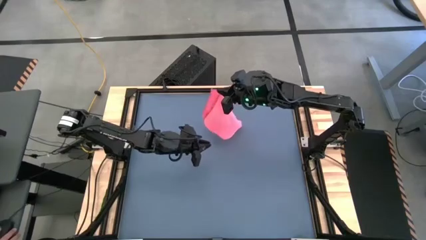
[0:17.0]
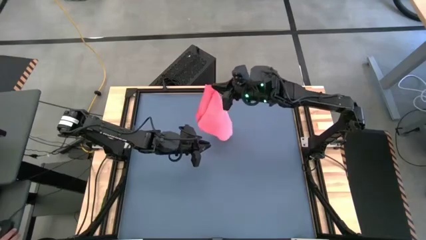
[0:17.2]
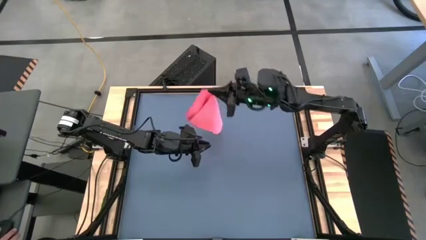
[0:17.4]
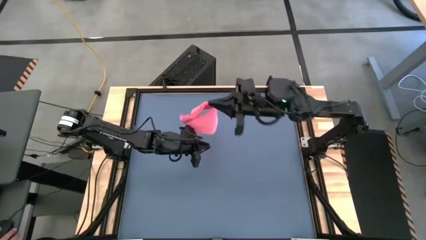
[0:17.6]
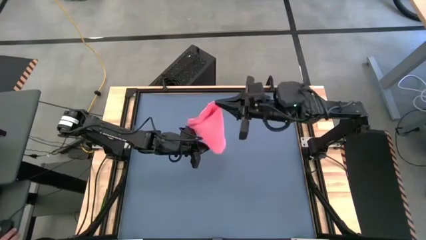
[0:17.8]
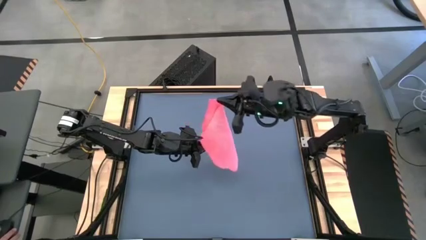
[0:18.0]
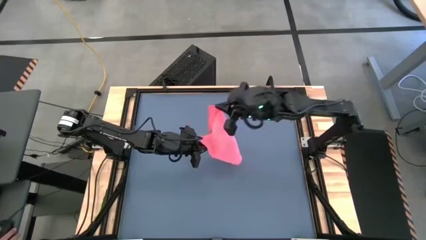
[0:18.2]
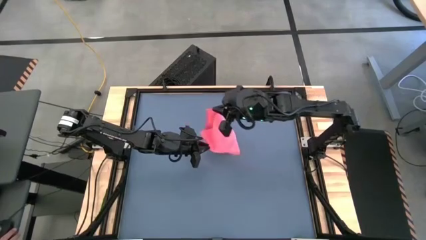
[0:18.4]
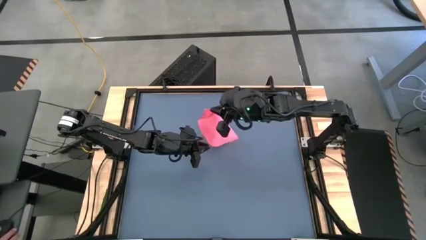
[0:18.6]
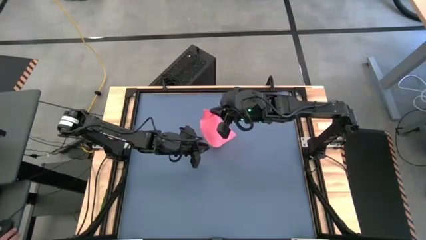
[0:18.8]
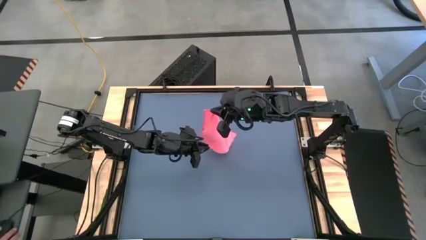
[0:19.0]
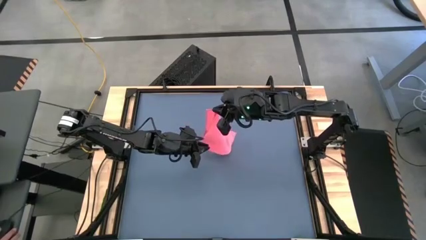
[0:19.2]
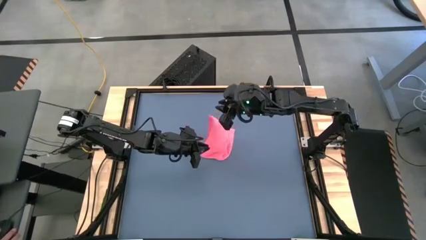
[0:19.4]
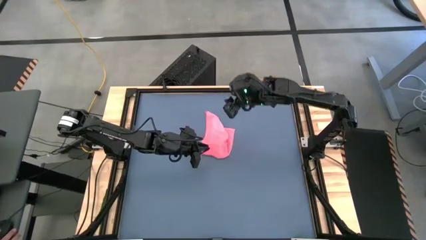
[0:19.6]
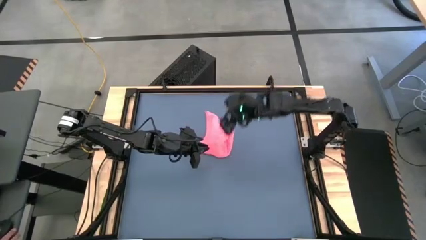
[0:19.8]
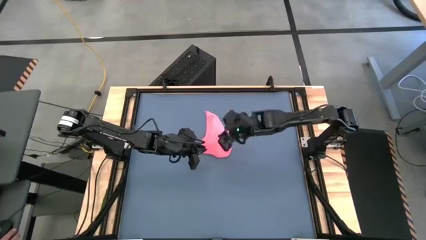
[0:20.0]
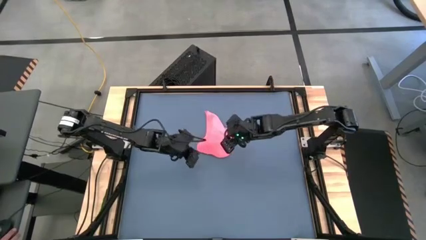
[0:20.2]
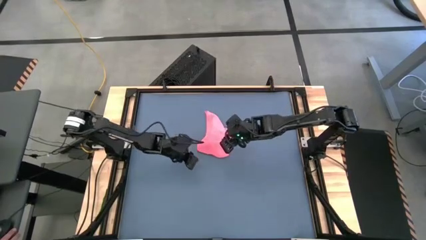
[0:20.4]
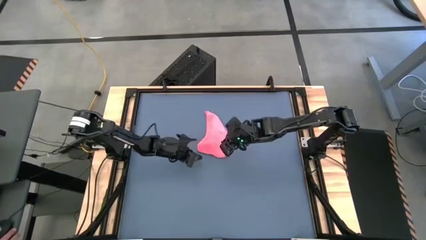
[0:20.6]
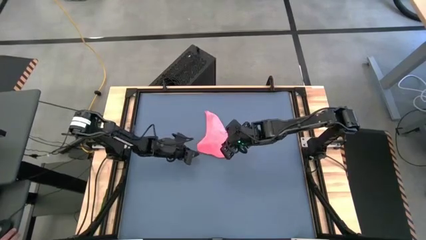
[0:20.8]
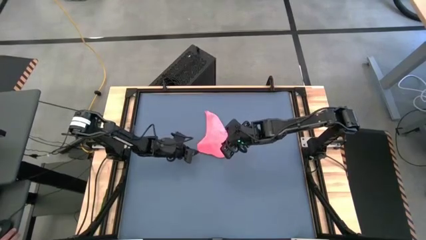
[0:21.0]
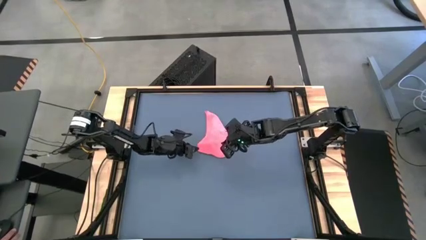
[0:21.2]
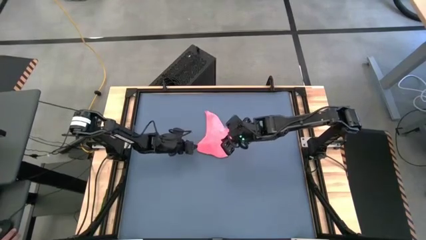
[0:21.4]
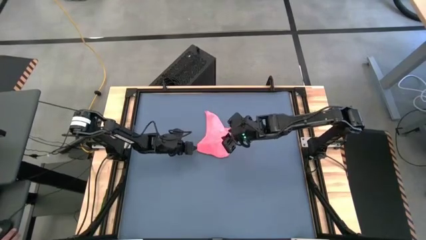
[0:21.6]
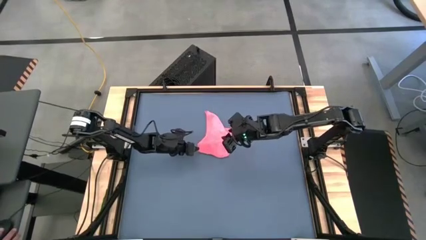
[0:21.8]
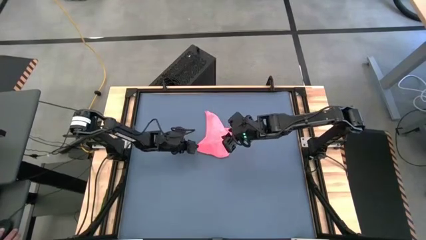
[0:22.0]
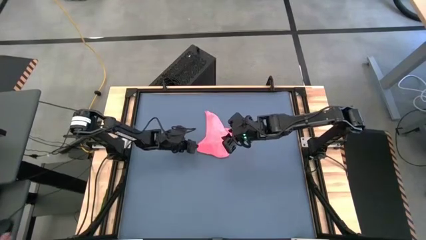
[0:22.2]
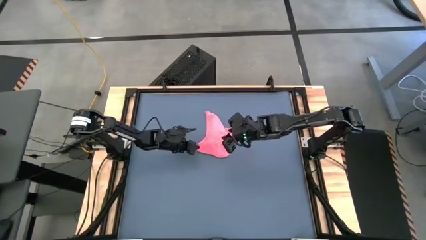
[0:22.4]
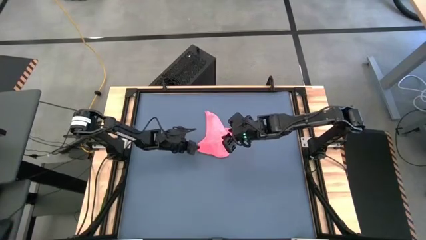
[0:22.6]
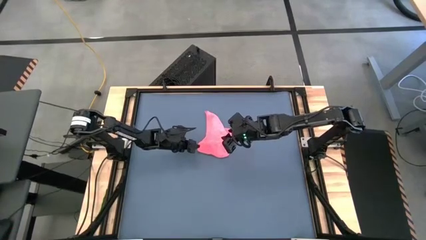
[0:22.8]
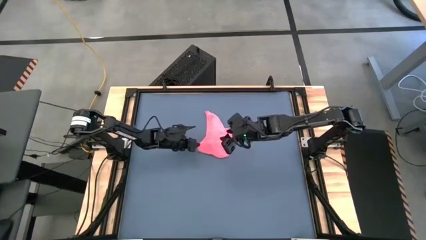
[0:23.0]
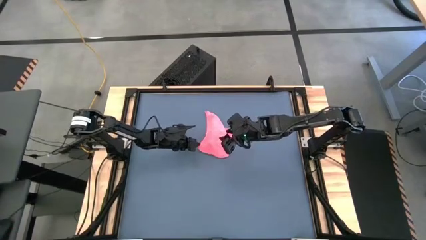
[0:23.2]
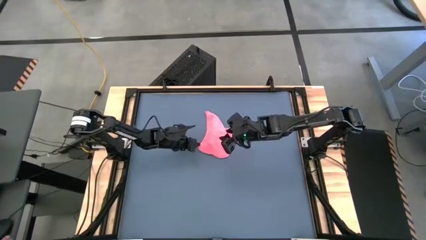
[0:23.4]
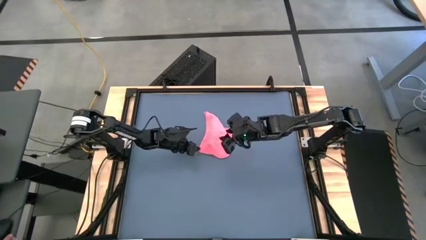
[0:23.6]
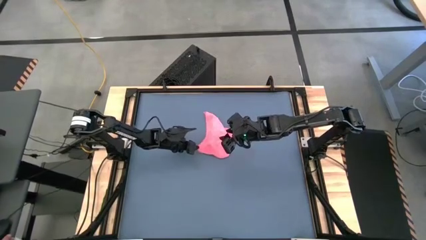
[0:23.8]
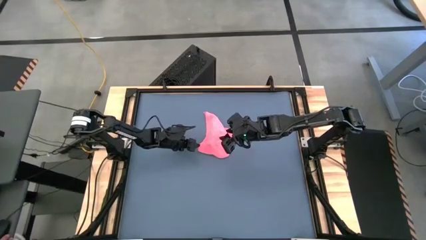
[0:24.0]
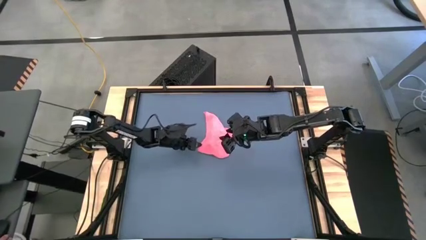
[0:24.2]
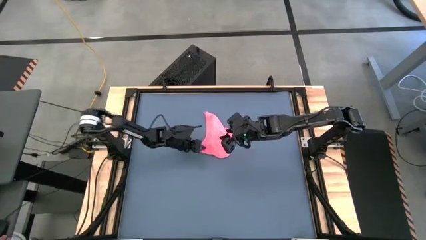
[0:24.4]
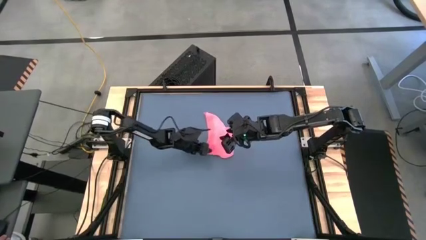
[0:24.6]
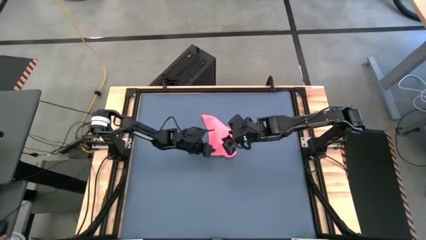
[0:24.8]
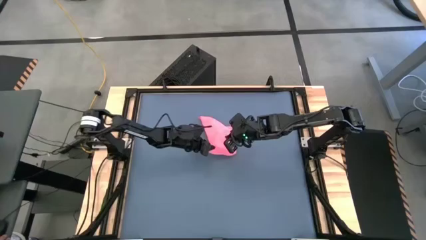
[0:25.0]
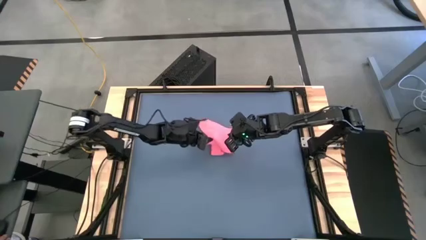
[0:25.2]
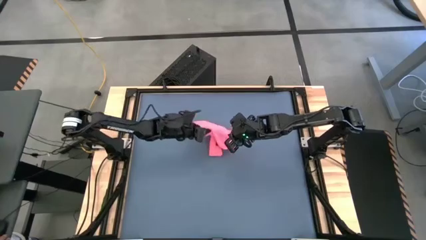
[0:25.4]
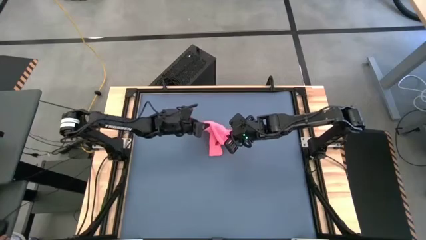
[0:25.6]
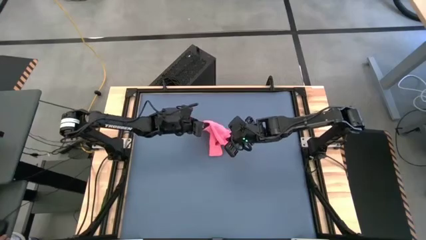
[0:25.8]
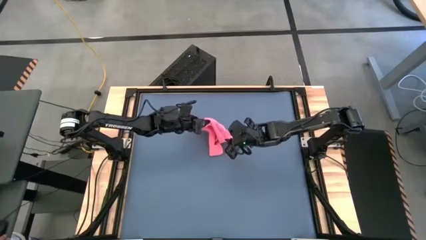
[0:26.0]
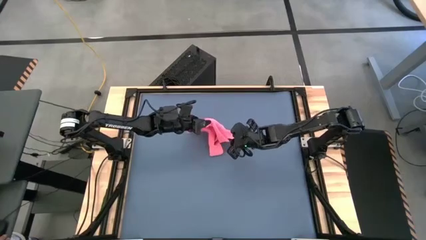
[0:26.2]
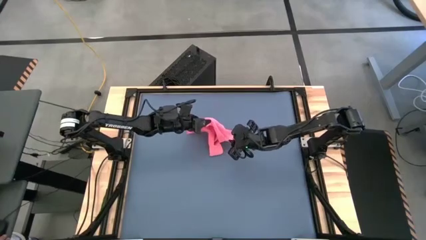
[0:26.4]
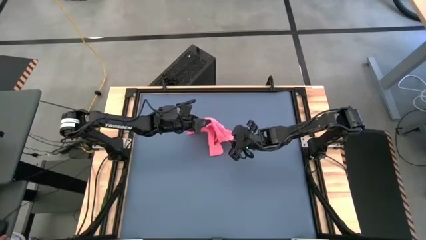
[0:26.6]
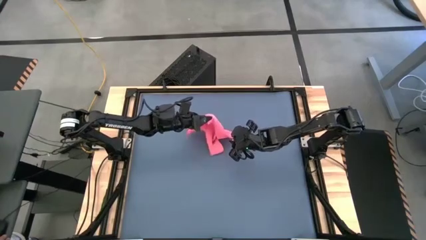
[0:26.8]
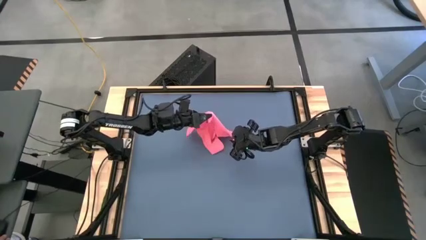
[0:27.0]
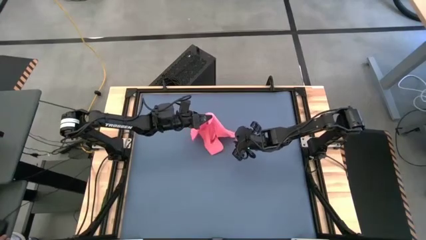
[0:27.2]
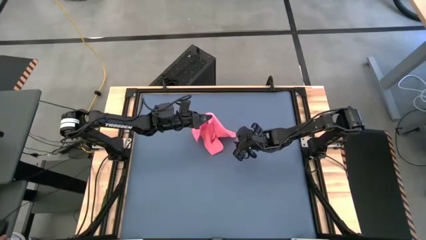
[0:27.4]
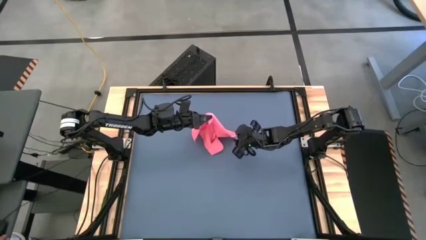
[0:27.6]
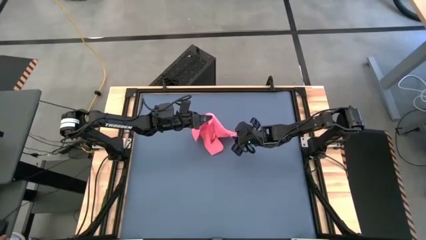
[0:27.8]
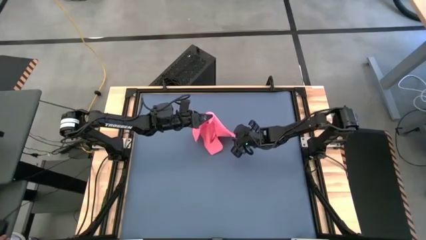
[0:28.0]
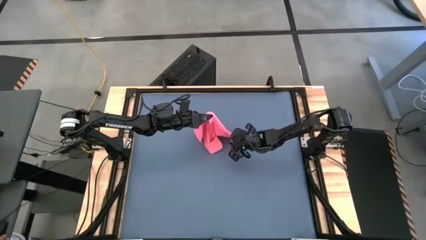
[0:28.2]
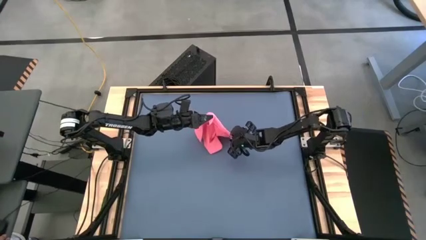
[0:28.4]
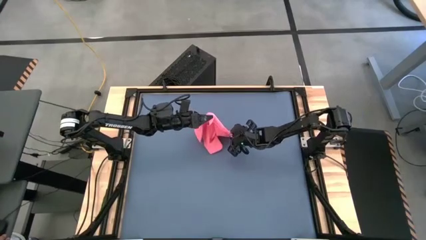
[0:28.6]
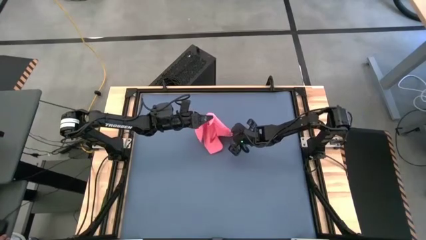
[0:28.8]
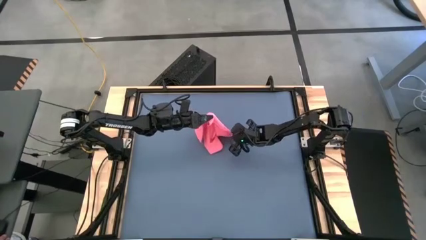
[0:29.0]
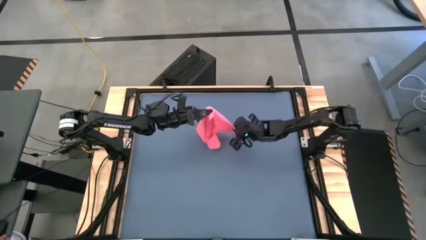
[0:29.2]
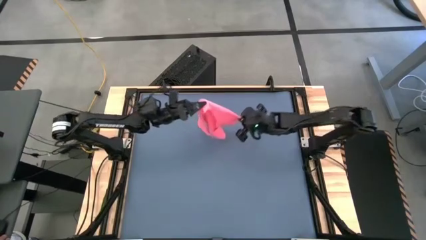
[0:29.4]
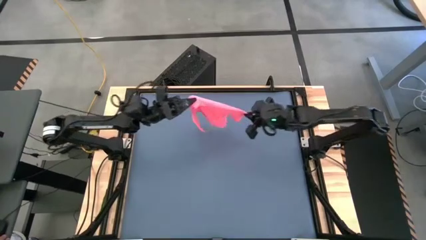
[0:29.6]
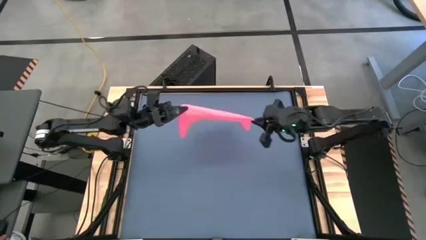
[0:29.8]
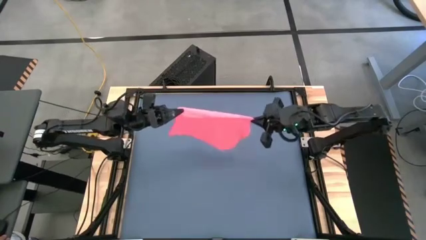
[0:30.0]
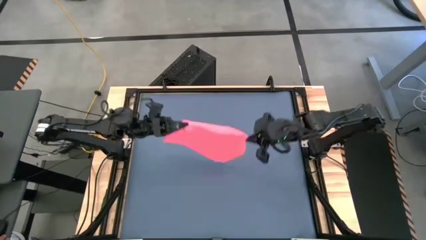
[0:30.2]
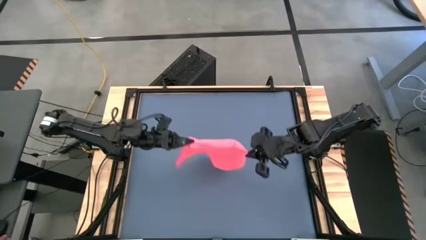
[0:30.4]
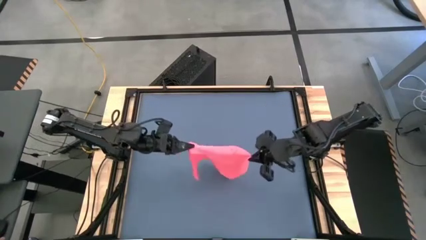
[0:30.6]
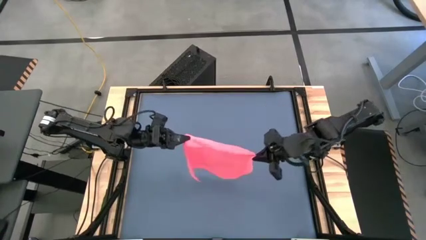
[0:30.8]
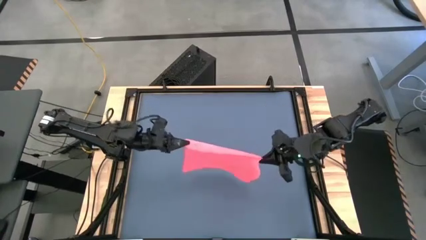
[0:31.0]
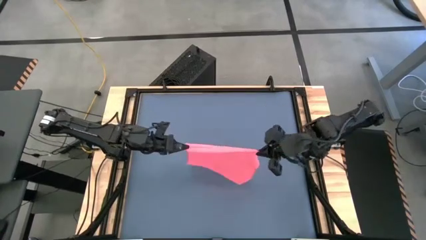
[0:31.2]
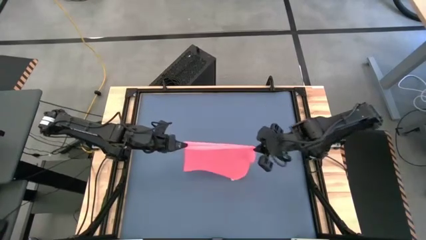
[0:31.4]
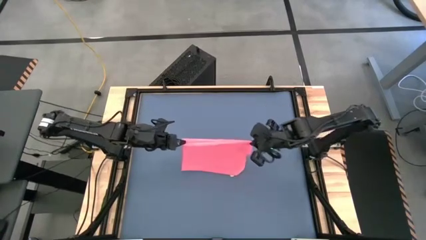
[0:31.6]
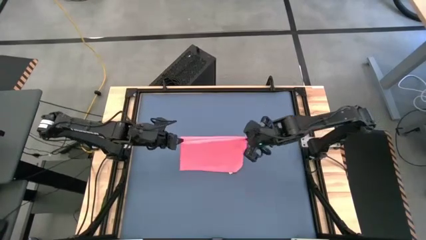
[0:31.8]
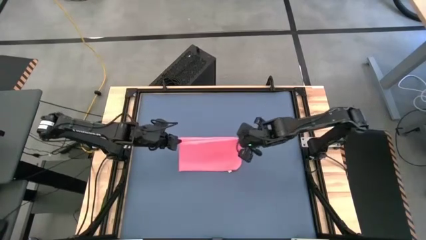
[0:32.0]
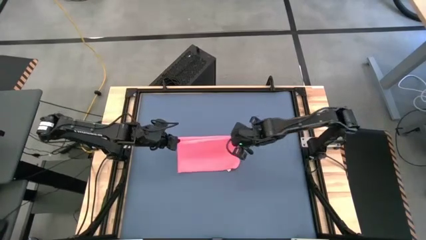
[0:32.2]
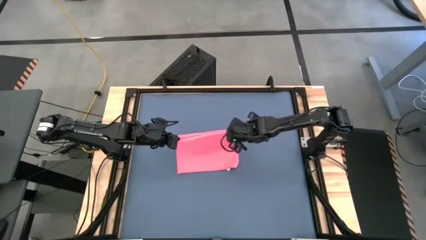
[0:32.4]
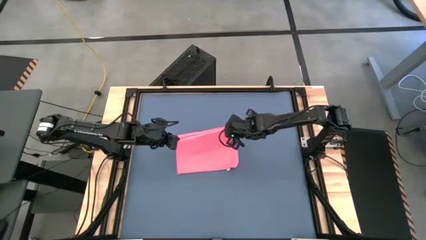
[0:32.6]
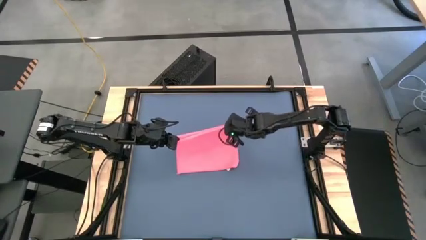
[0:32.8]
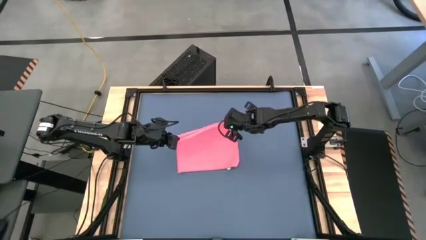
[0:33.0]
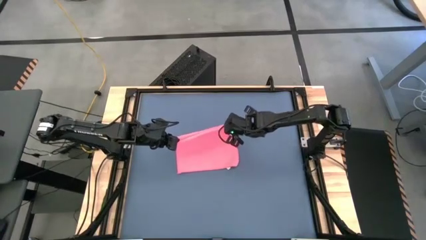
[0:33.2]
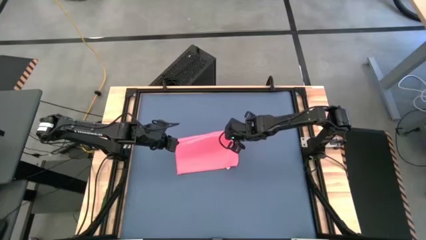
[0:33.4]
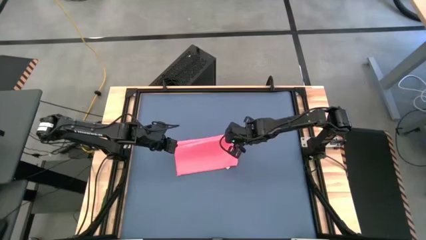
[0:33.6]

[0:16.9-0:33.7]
Task: Roll towel
Fold the pink towel
